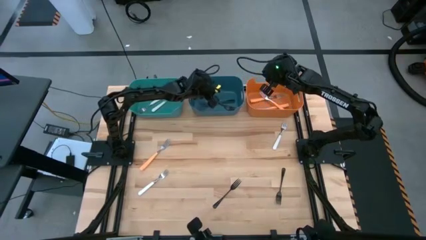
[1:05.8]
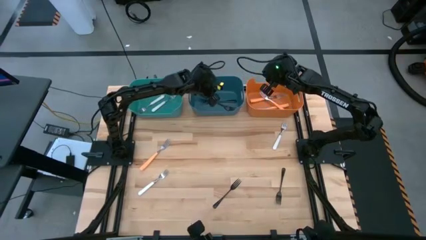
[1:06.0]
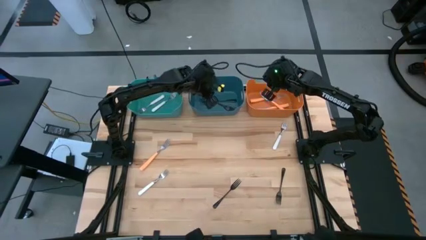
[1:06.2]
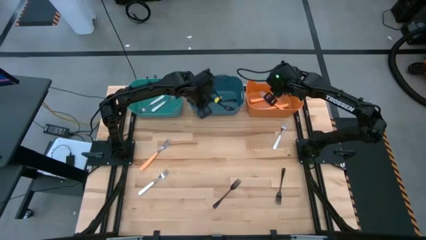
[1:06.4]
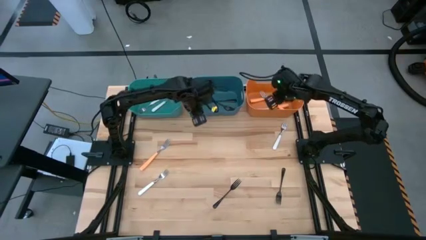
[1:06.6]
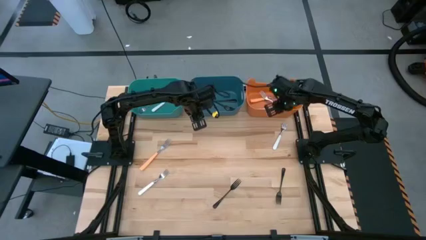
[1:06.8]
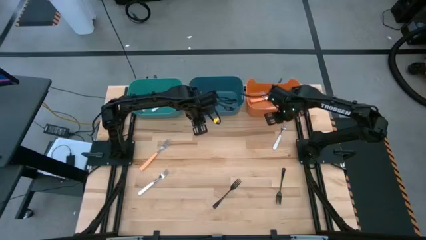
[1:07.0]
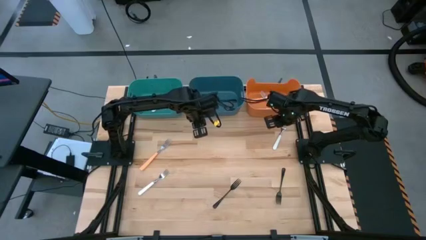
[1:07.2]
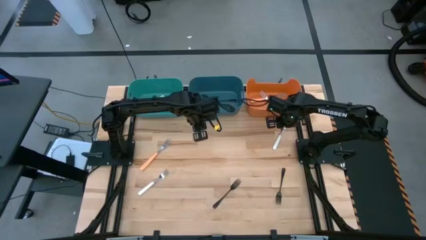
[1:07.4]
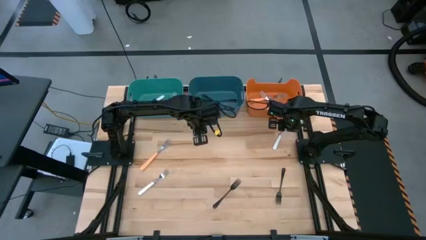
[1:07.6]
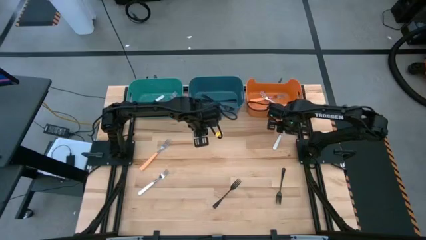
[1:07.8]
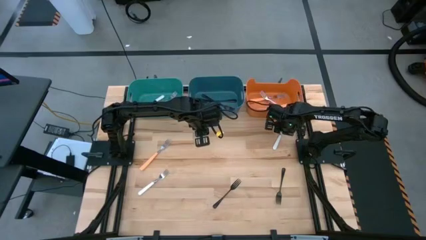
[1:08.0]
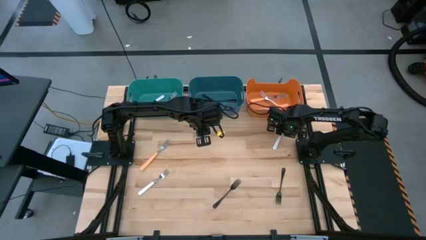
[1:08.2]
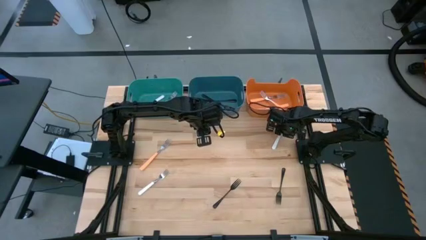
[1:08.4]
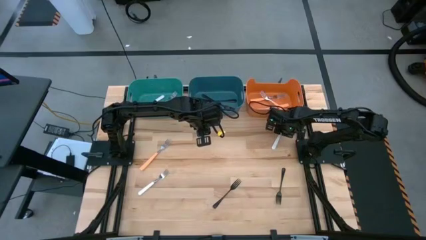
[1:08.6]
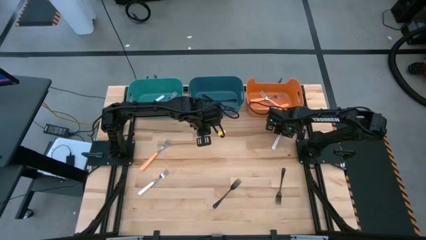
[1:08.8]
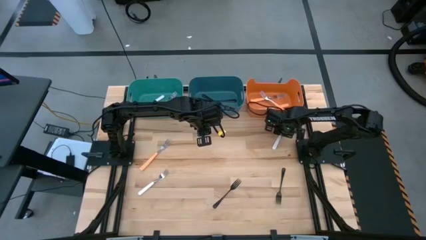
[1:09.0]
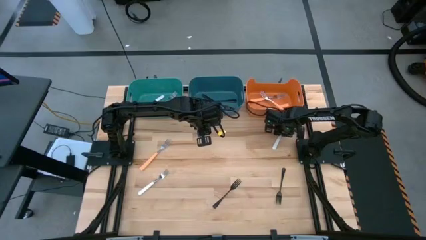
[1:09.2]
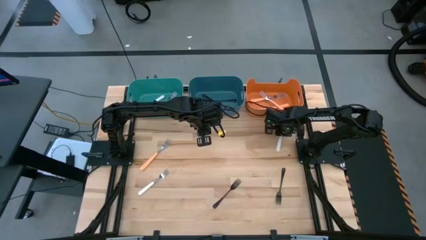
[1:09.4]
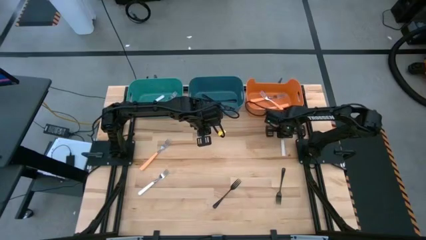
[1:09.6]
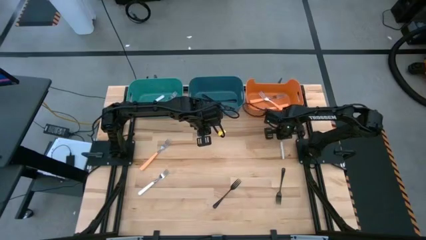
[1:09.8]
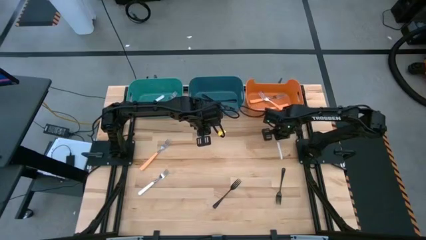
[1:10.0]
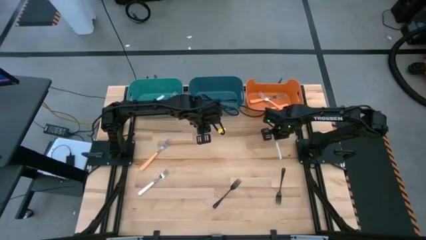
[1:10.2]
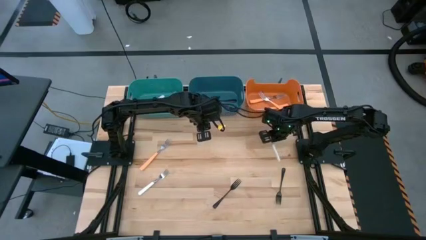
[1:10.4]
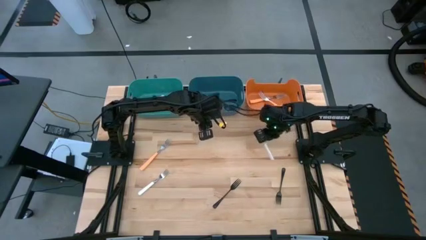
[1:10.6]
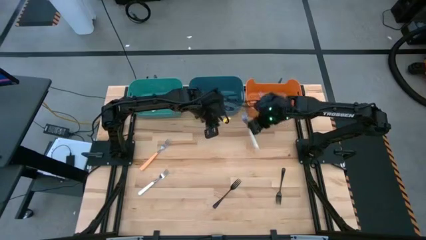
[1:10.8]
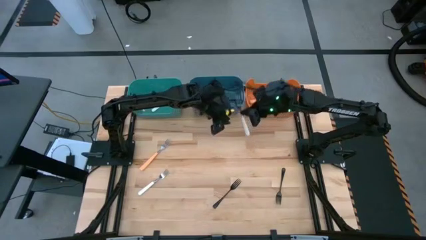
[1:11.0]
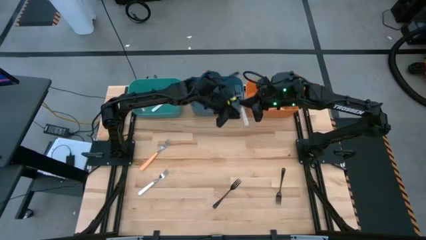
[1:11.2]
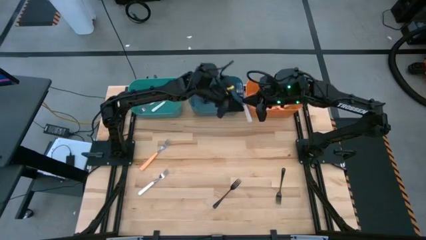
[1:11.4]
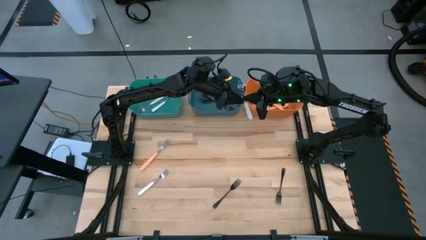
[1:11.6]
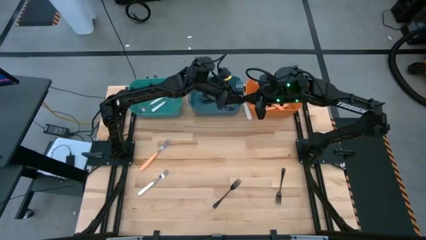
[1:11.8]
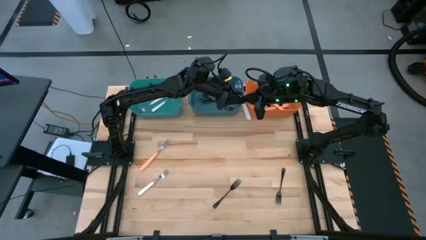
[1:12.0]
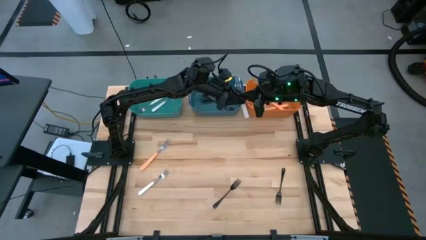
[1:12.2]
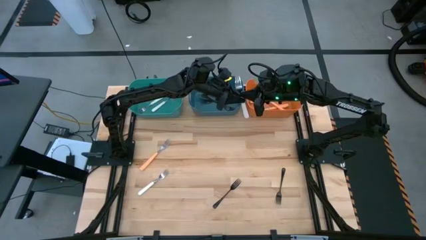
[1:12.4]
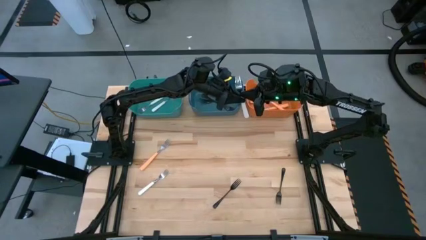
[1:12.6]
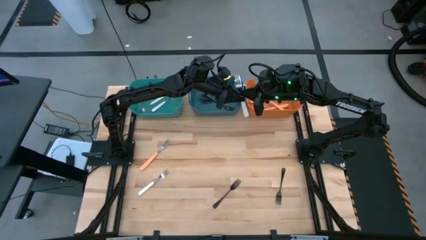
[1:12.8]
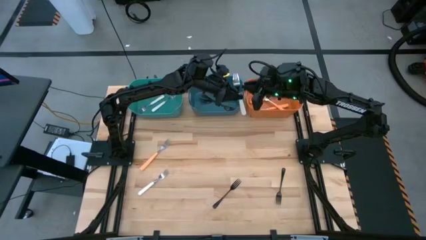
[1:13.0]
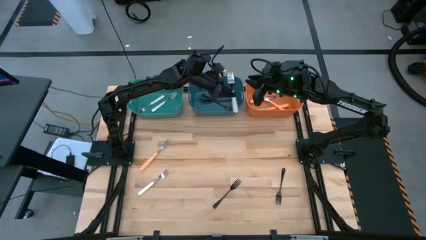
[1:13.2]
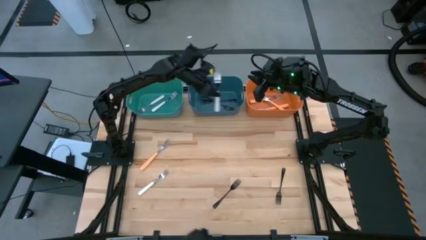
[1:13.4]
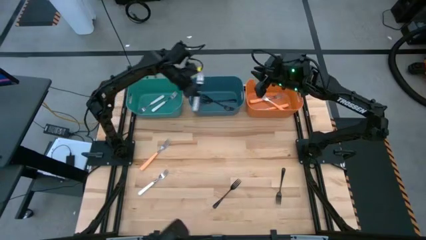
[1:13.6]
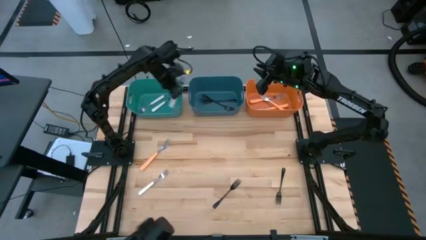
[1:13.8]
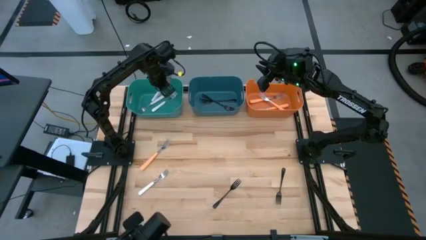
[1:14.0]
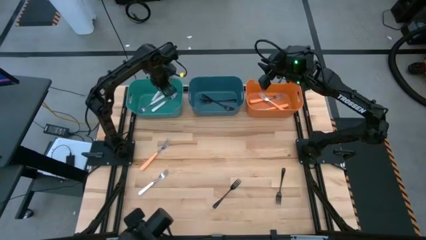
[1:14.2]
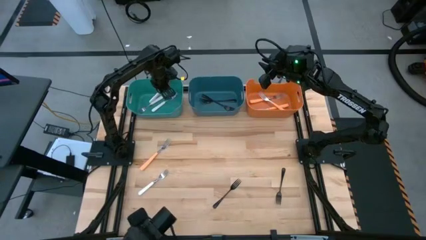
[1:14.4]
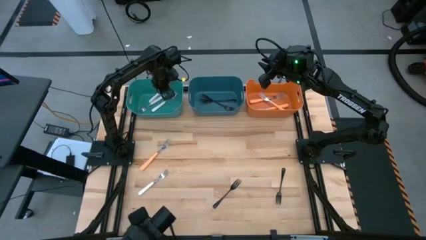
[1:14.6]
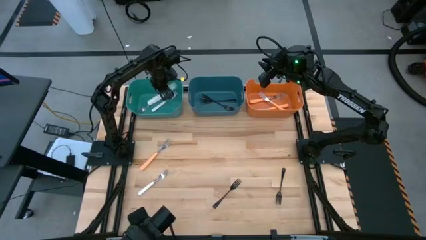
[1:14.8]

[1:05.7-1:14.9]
Task: Sort silverware by color (type)
Put the white fork into the green bin

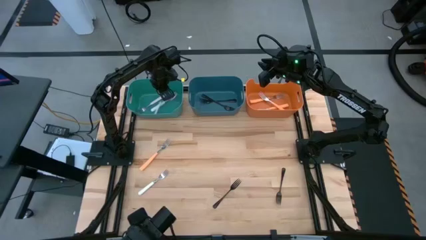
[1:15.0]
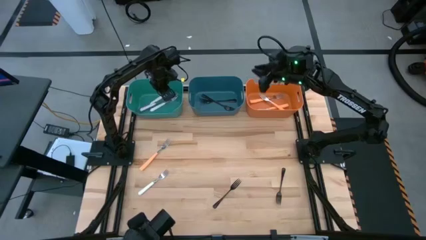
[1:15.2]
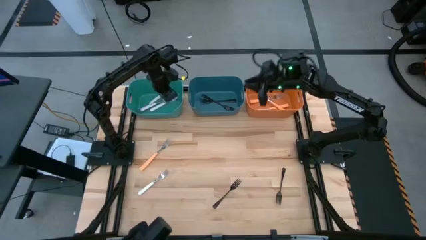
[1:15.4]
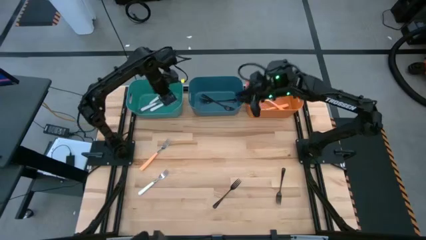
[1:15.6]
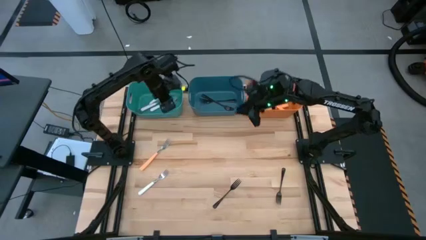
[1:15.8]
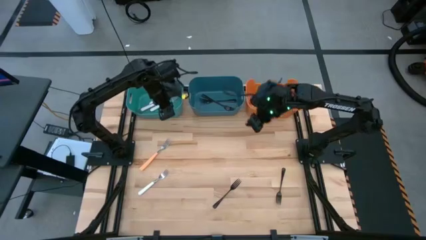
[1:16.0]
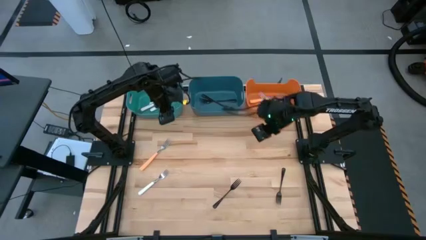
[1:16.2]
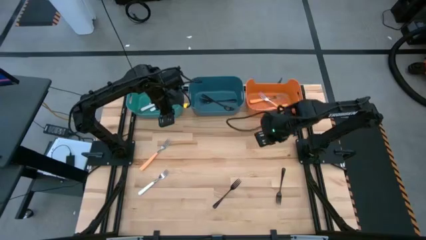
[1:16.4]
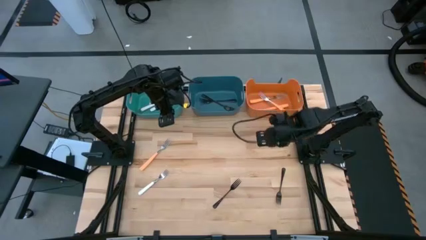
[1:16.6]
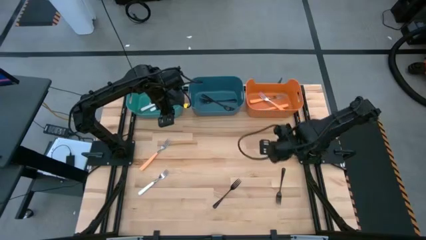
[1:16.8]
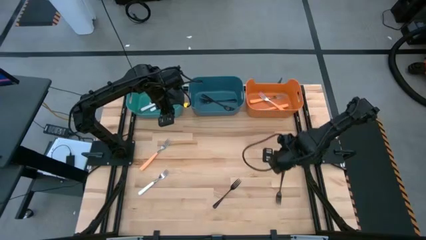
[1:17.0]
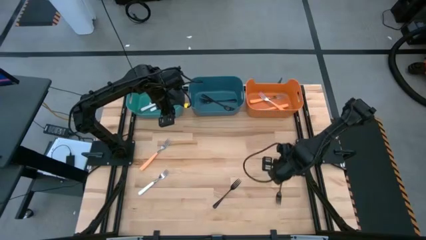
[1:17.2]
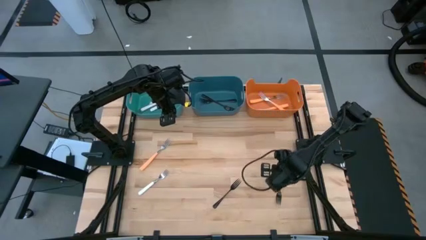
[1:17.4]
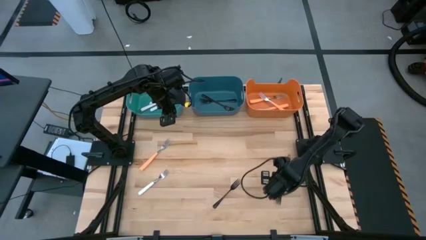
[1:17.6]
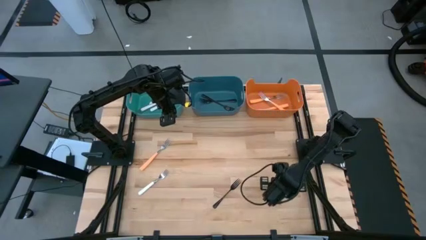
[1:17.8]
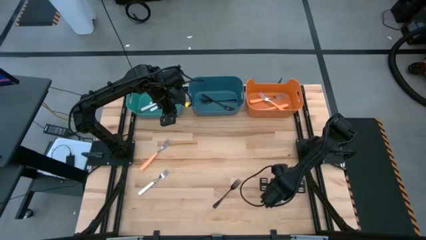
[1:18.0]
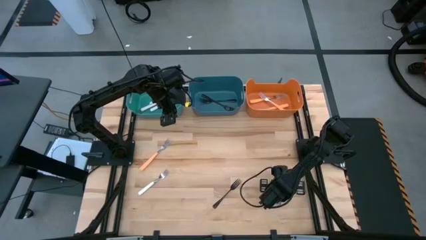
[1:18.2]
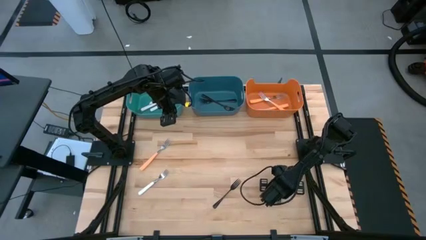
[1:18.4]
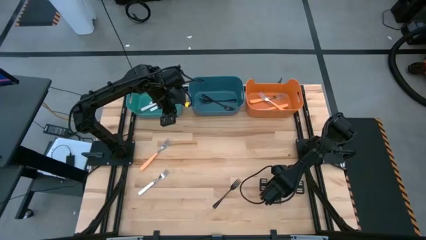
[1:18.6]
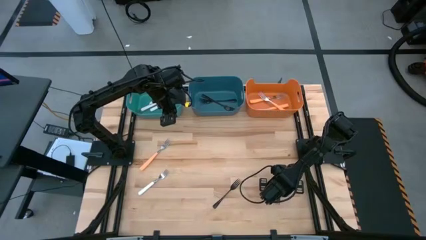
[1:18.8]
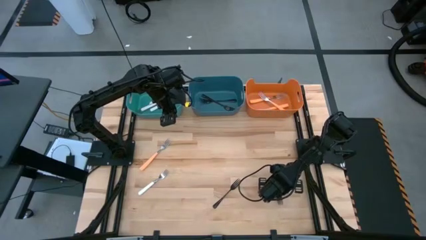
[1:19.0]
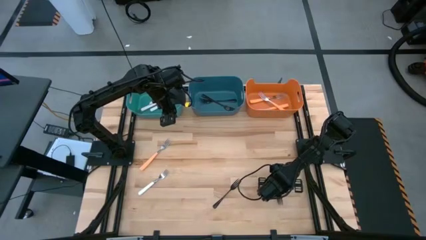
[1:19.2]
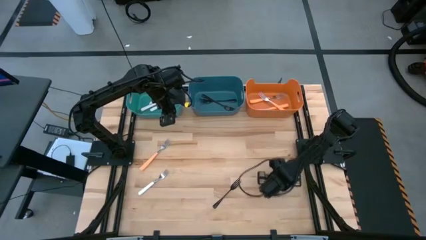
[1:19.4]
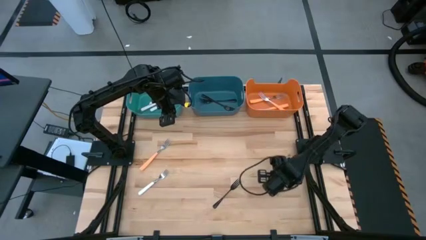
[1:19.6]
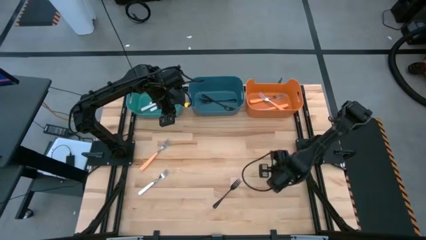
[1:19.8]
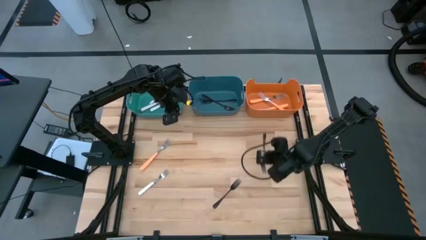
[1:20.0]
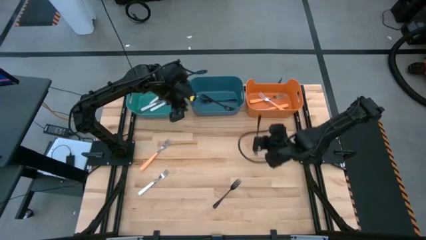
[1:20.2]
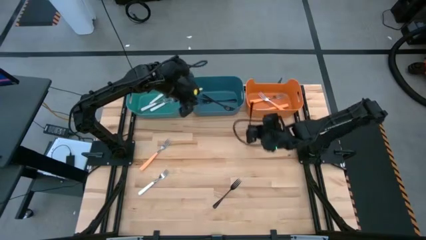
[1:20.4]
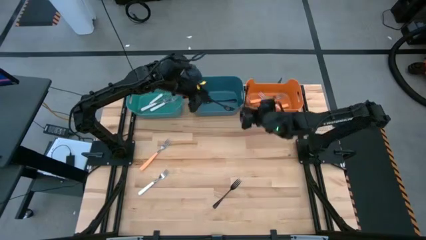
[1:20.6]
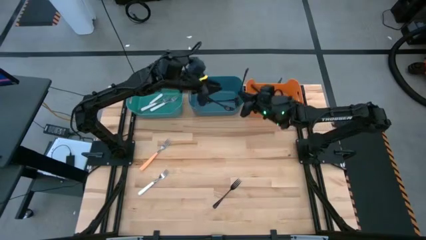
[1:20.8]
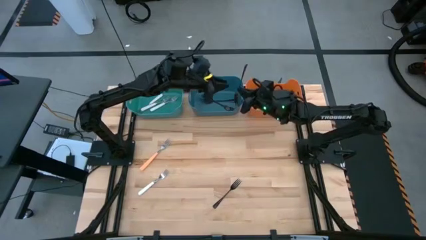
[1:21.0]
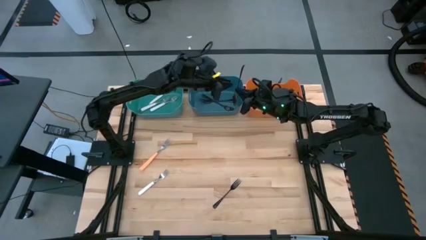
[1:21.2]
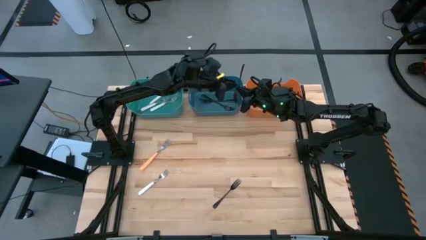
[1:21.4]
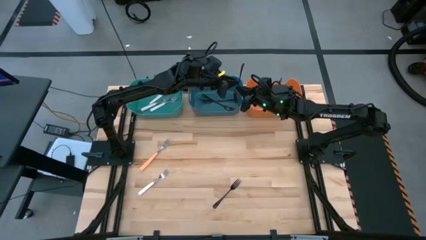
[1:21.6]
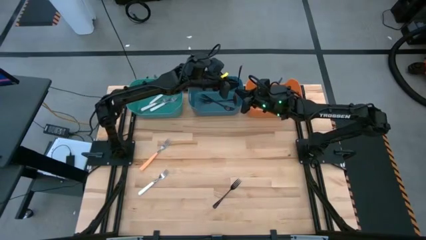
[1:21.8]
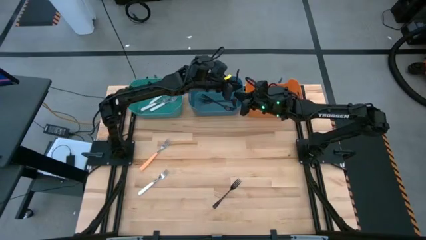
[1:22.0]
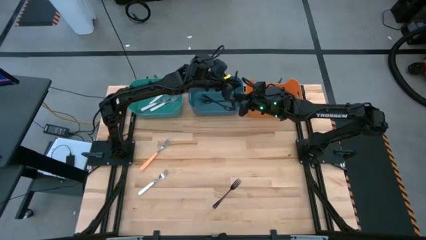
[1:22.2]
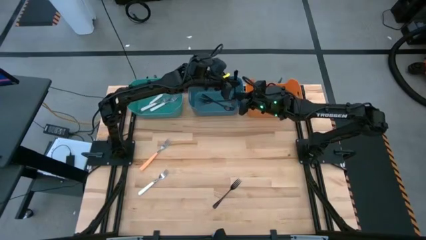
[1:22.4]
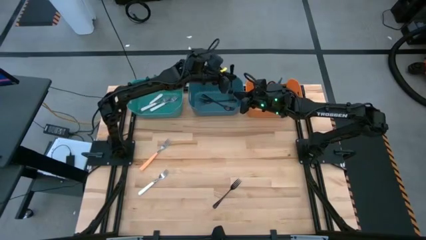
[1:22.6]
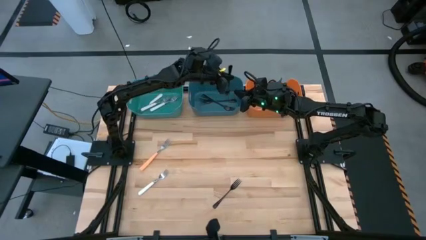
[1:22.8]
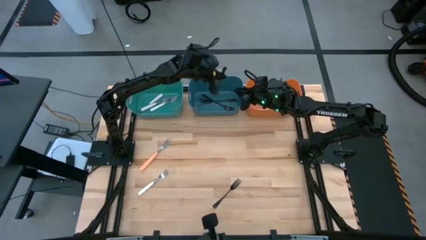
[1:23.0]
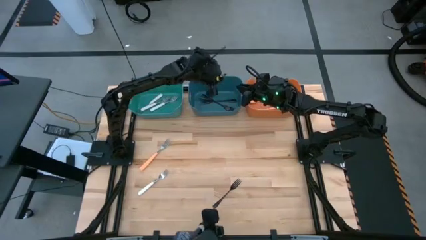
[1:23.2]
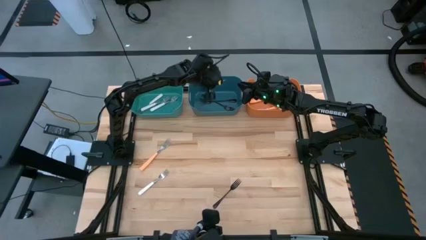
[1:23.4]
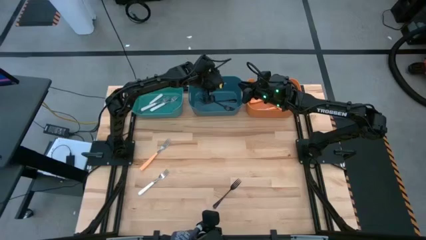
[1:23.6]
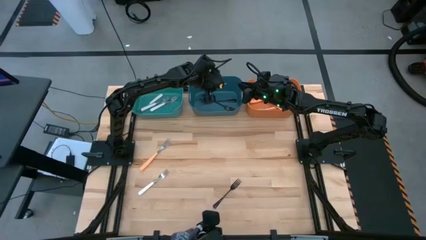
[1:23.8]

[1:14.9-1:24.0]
Put the black fork into the blue bin
